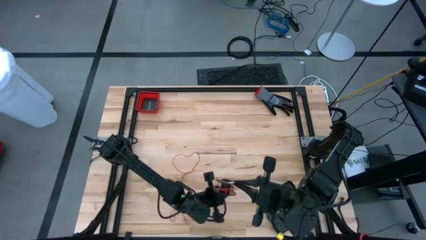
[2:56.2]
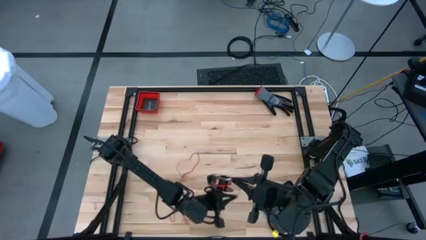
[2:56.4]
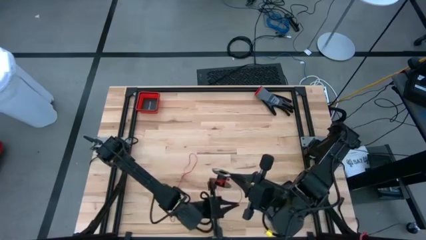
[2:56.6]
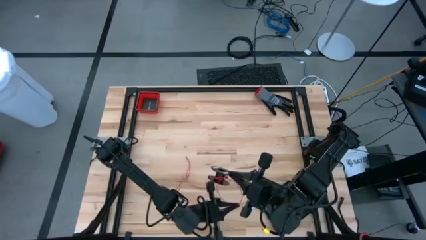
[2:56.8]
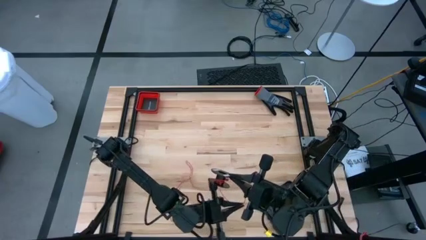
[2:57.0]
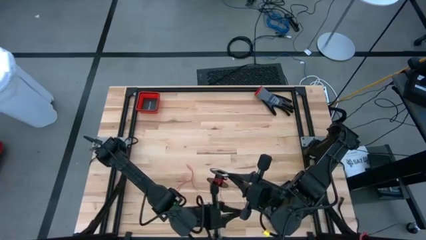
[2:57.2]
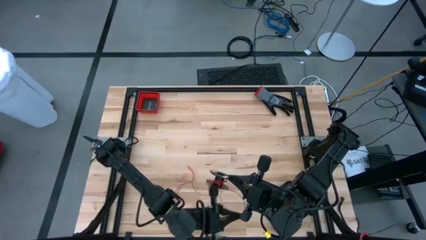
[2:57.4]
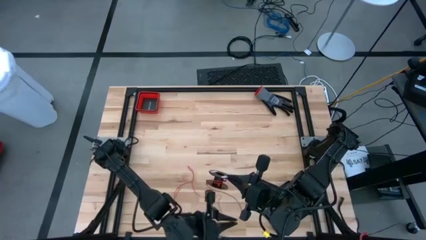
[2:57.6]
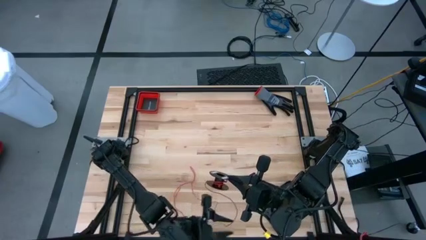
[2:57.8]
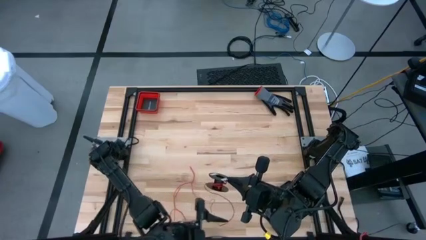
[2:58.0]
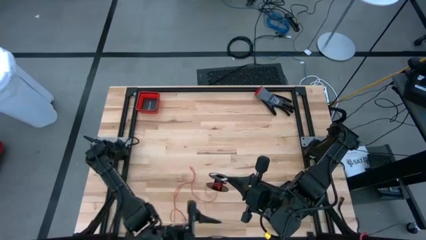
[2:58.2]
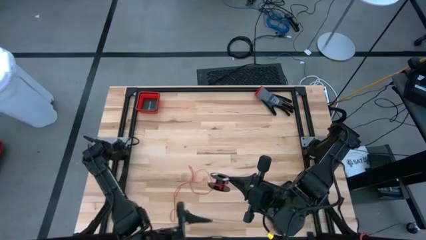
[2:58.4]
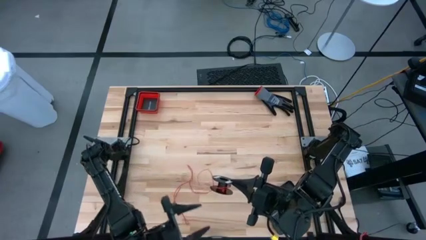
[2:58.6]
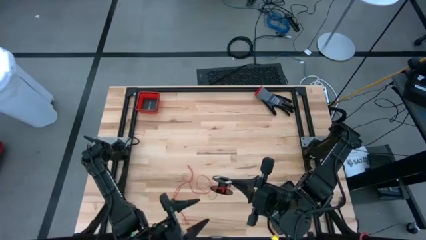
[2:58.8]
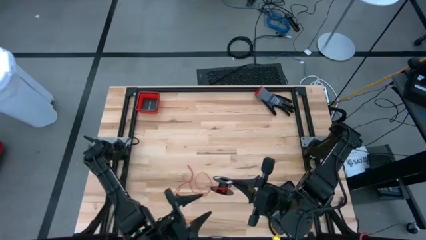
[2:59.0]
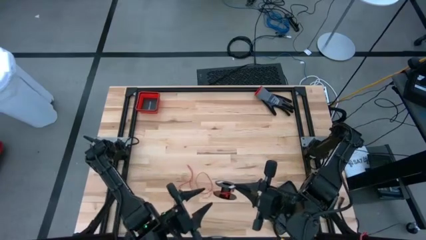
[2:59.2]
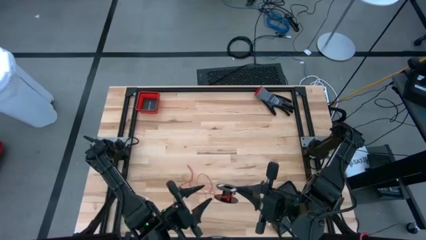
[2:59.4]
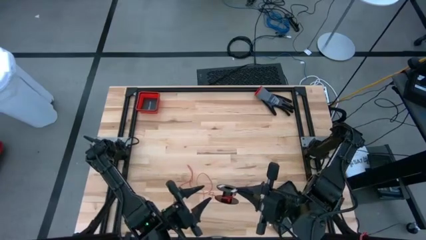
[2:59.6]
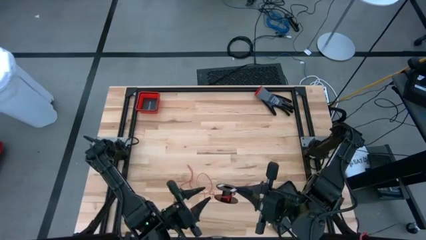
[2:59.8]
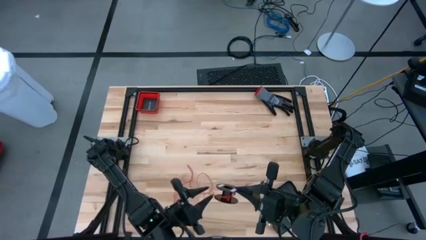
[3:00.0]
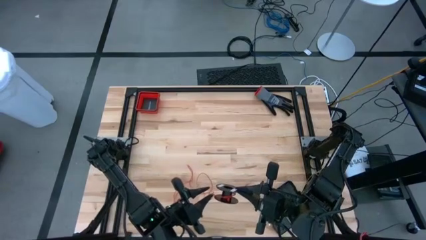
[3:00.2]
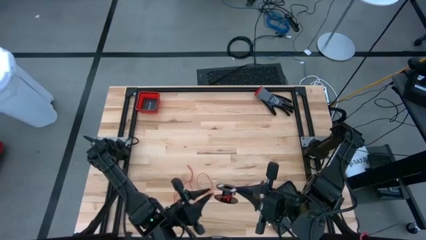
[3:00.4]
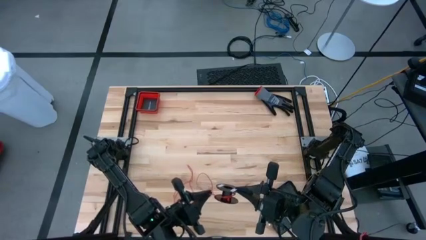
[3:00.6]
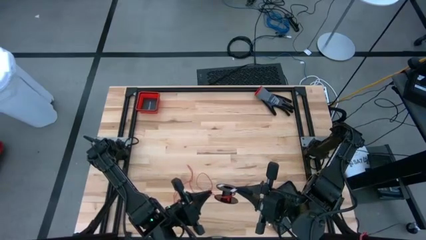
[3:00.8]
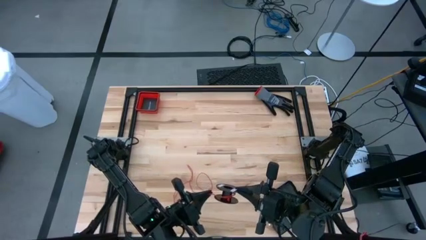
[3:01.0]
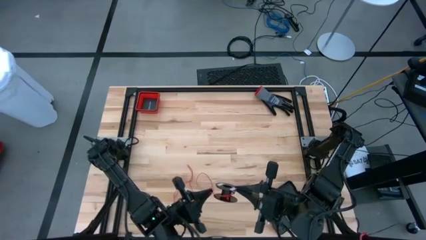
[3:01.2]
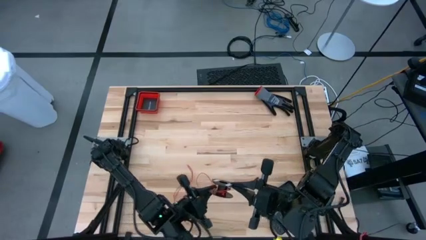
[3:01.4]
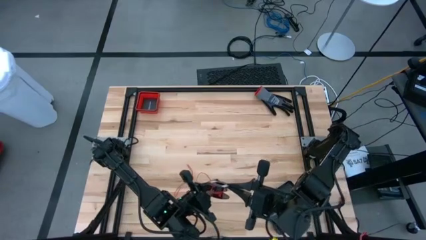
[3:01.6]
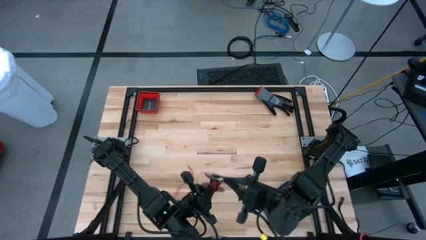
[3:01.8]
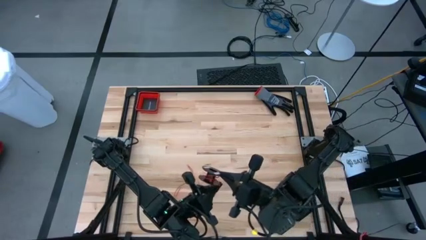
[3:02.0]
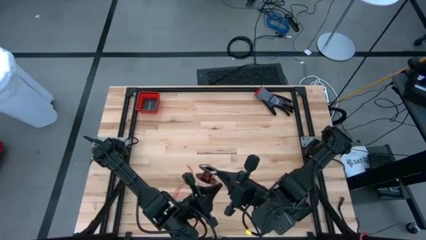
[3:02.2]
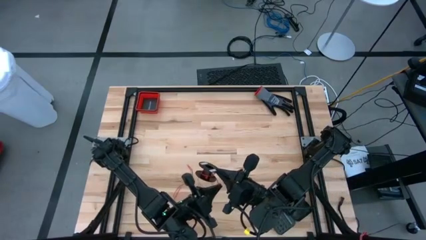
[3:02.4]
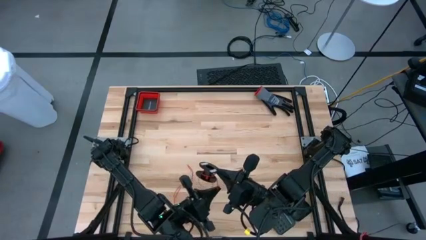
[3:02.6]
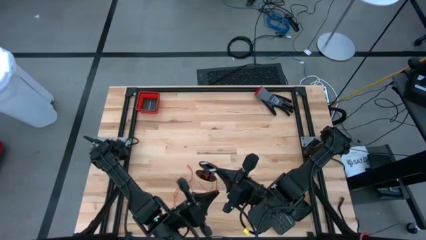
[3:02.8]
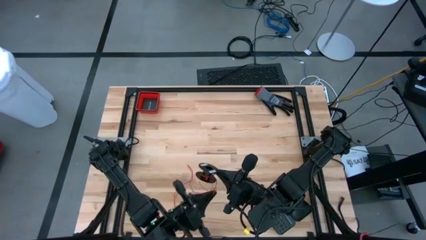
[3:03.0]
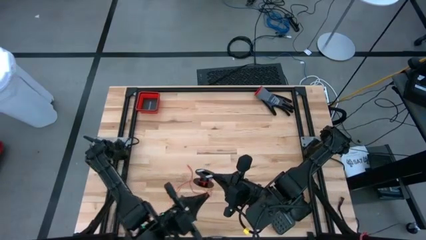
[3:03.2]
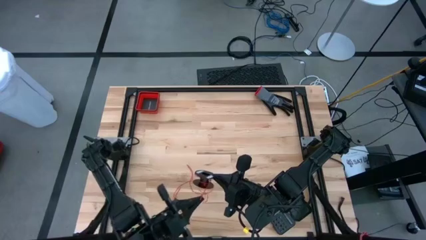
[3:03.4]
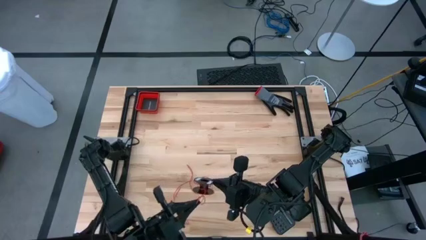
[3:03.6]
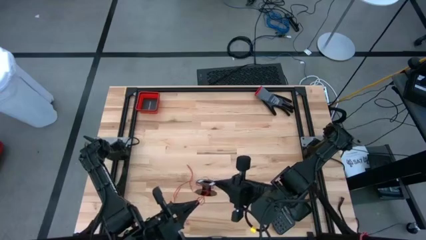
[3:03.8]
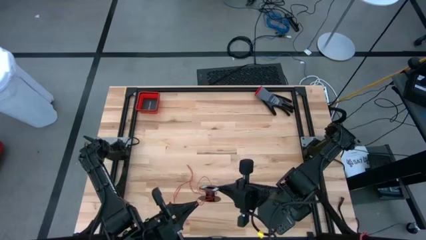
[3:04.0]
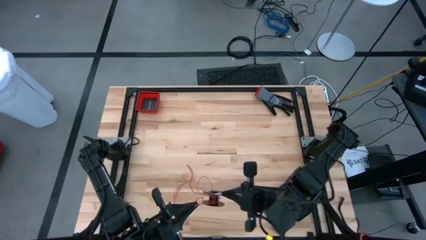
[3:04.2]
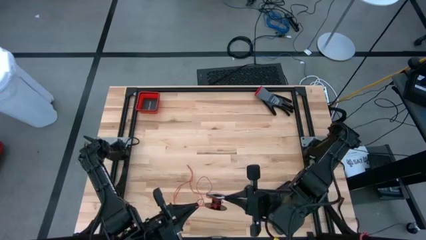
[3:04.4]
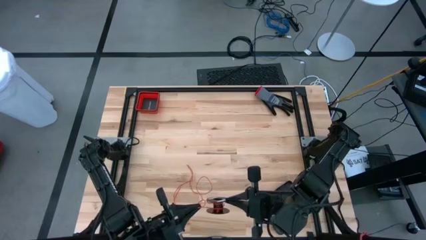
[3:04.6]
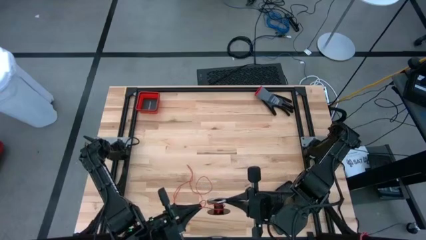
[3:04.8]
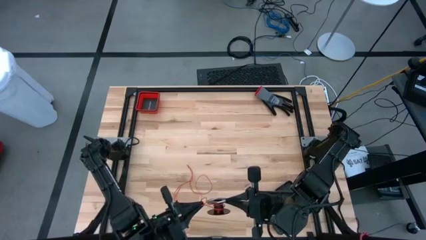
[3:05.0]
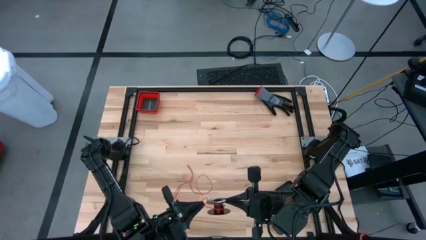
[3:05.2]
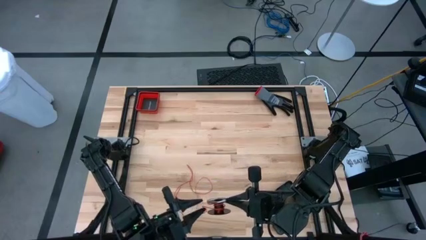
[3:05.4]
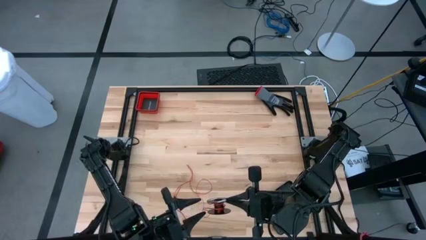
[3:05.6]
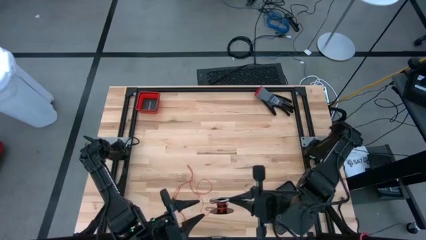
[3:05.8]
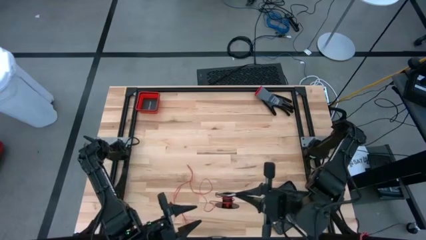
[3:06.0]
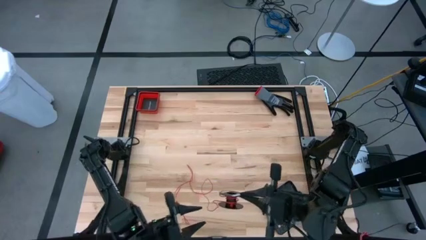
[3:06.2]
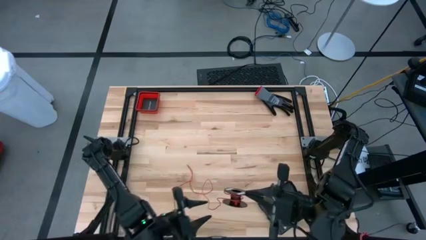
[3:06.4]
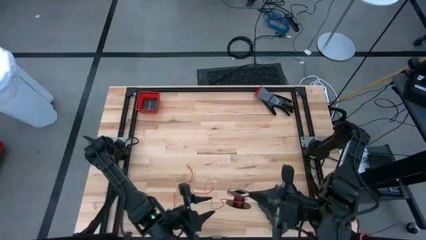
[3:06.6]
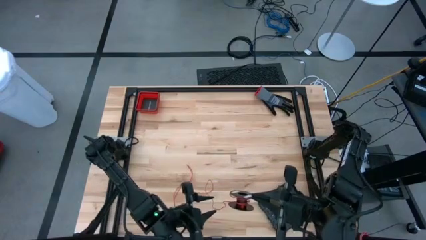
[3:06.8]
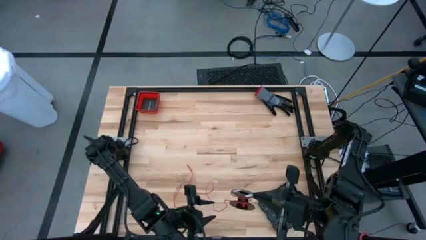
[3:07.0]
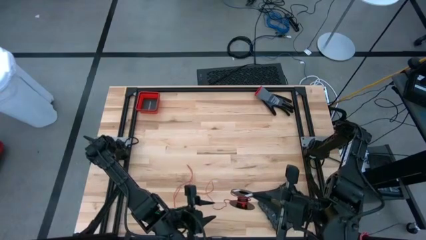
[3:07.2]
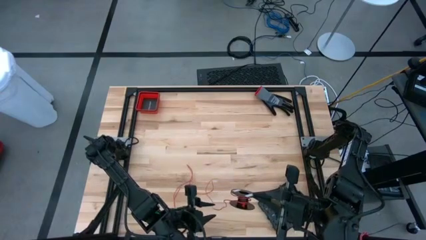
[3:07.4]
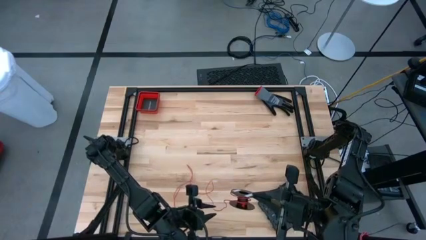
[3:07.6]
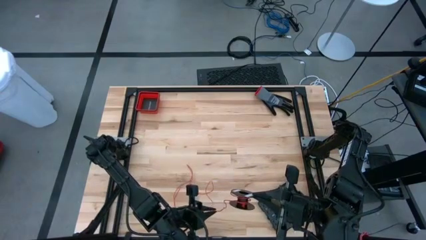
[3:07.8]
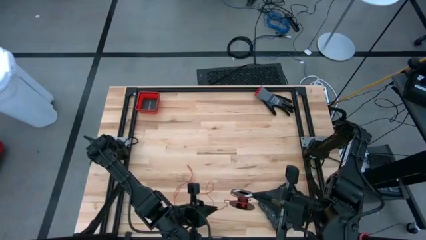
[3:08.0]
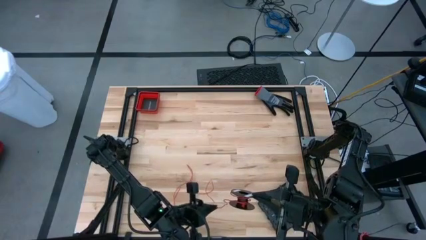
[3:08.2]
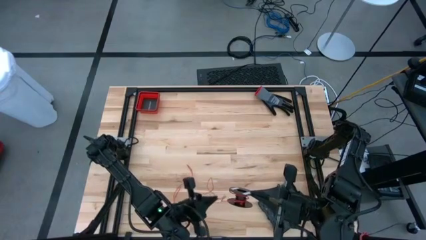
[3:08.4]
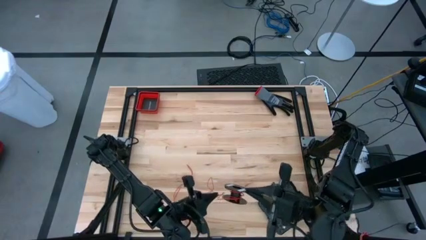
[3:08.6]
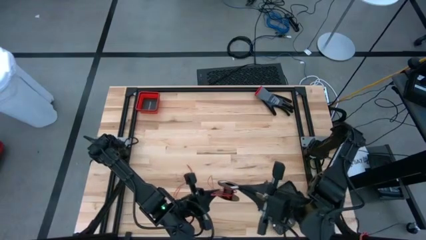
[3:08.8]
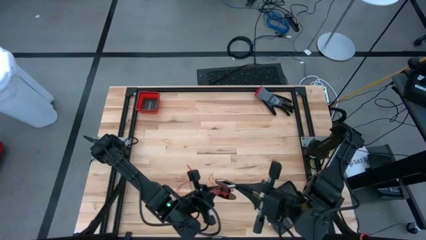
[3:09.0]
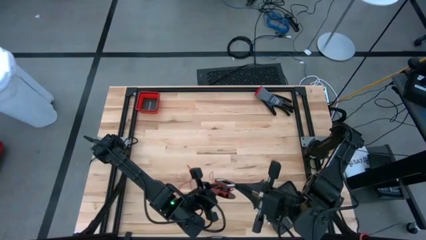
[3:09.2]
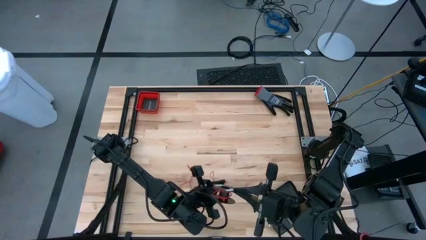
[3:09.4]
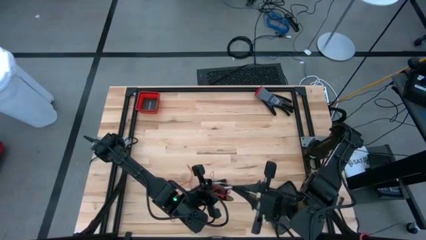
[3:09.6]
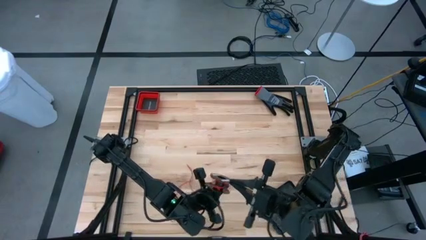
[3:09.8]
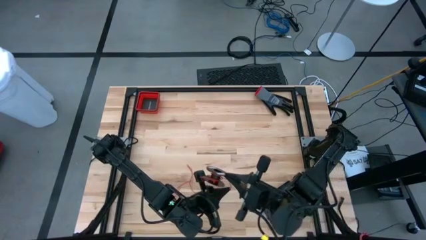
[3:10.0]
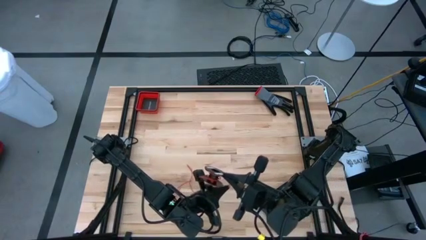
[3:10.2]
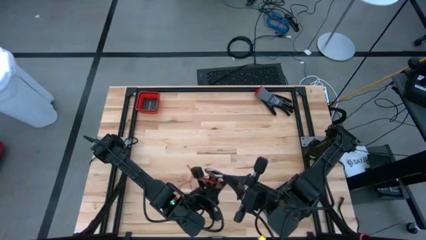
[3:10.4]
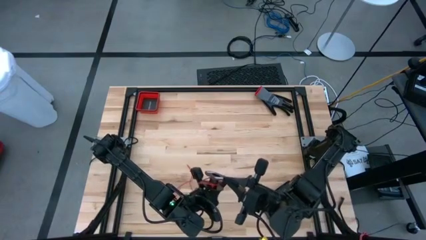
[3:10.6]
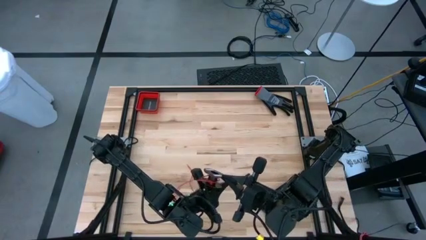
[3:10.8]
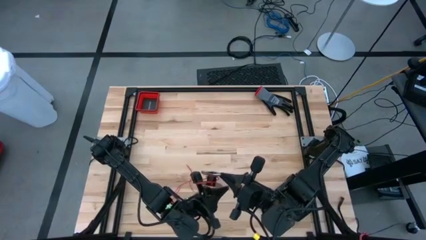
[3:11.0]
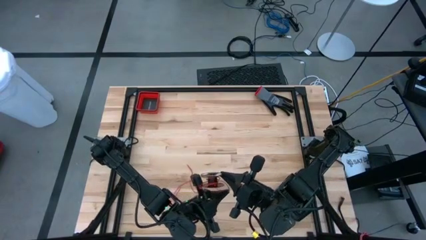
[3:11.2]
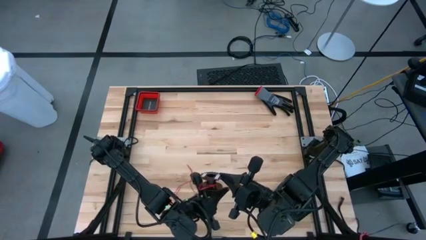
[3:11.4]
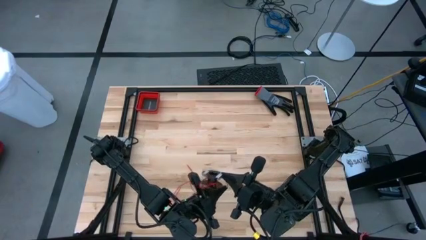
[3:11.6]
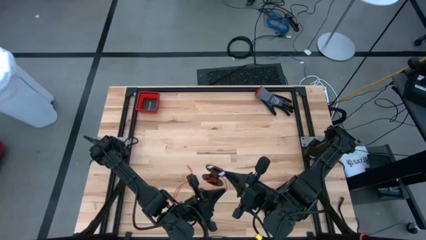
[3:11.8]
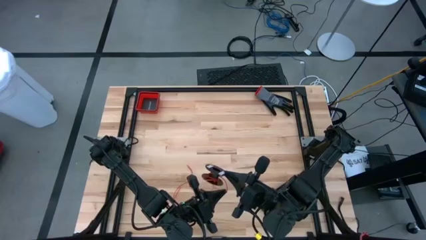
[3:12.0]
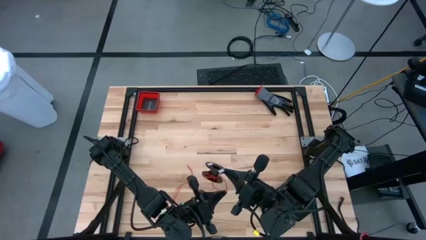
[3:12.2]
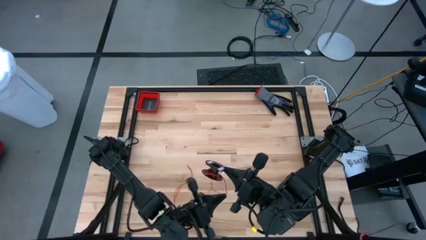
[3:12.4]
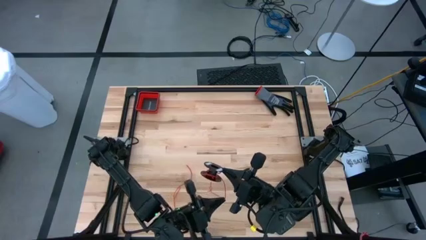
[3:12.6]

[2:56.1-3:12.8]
Task: Coil cords
Coil the red wire onto the spool
